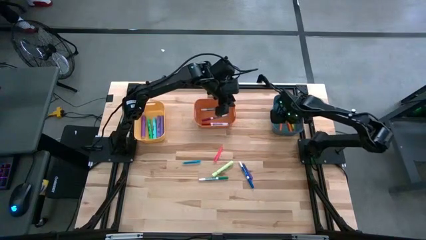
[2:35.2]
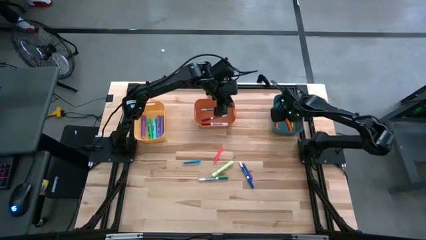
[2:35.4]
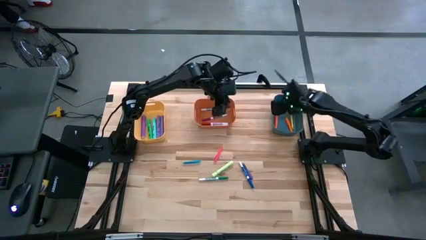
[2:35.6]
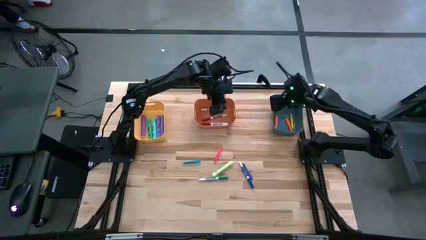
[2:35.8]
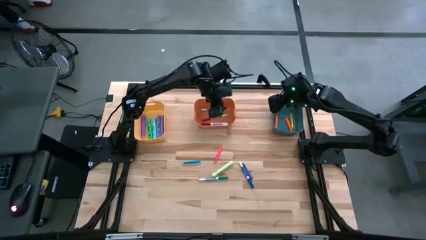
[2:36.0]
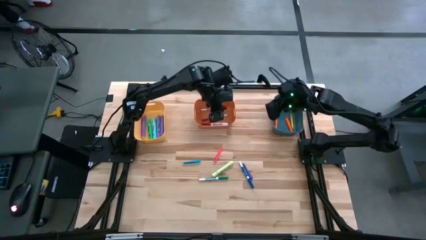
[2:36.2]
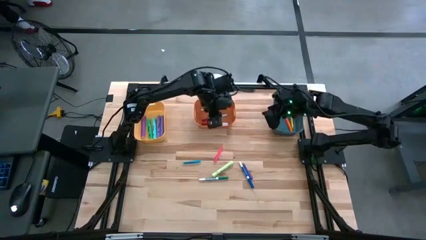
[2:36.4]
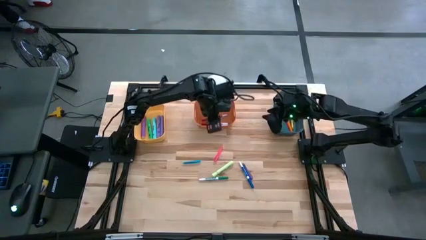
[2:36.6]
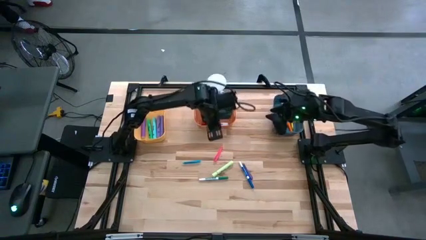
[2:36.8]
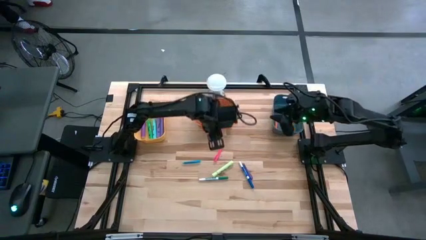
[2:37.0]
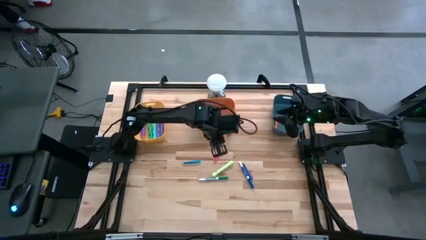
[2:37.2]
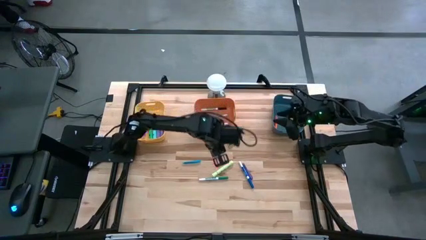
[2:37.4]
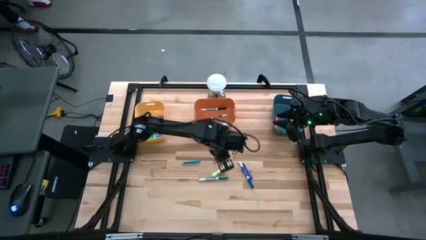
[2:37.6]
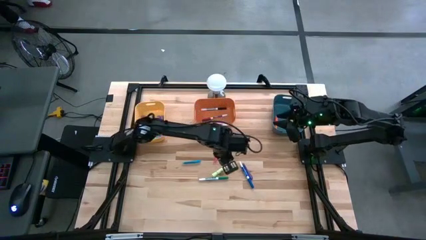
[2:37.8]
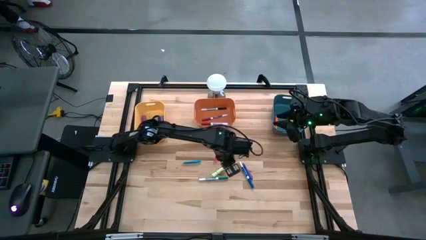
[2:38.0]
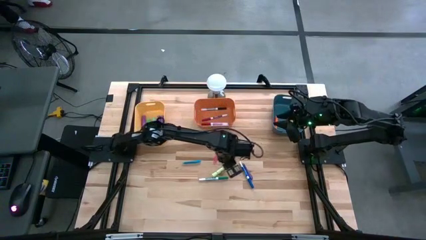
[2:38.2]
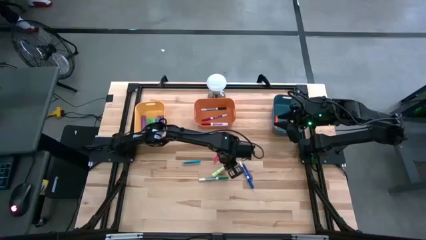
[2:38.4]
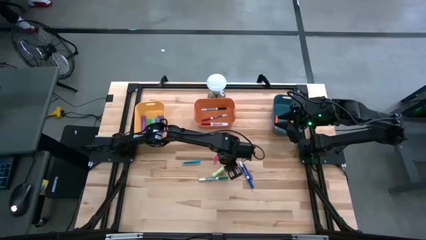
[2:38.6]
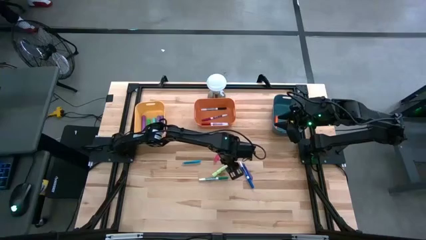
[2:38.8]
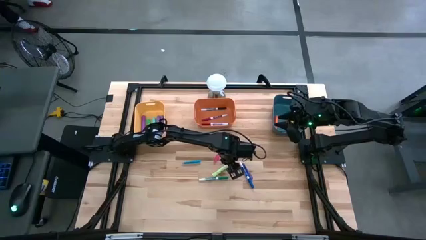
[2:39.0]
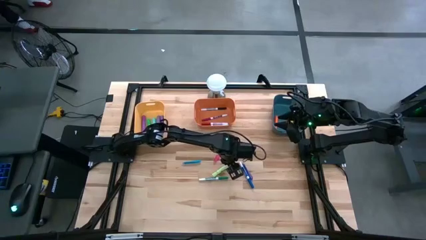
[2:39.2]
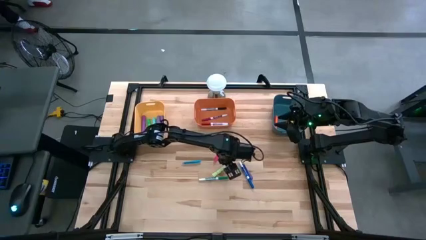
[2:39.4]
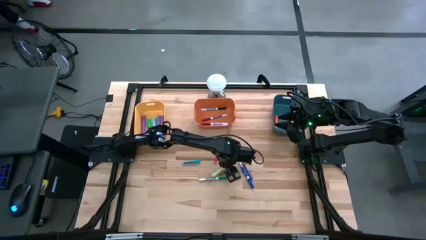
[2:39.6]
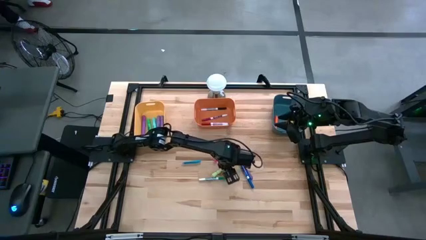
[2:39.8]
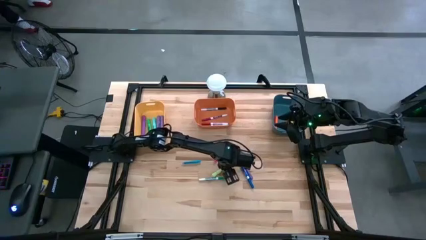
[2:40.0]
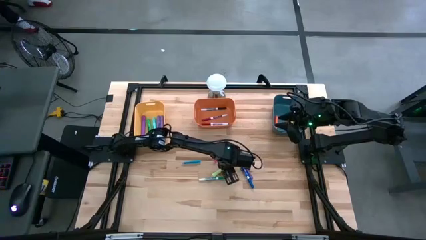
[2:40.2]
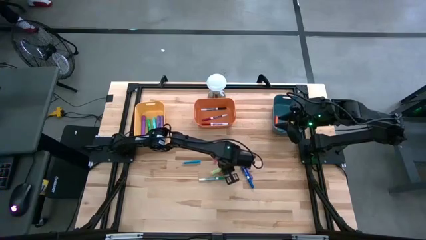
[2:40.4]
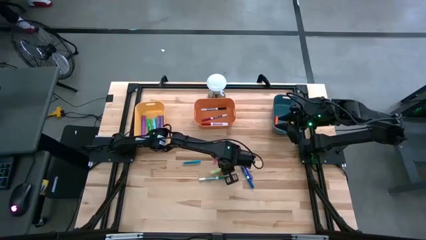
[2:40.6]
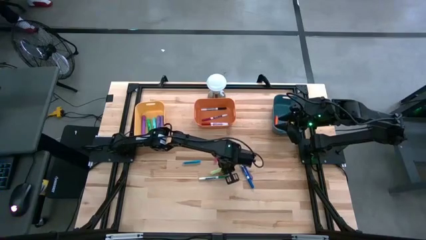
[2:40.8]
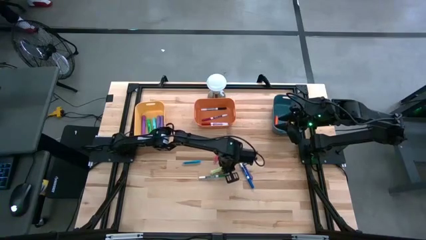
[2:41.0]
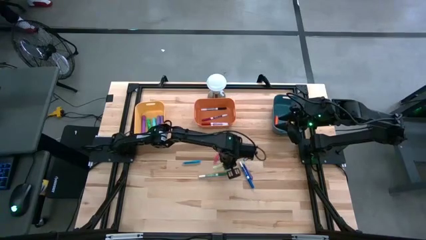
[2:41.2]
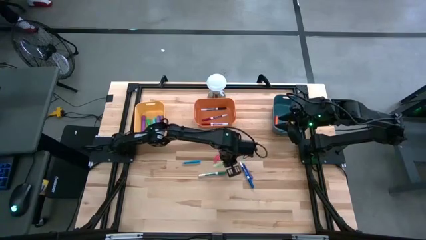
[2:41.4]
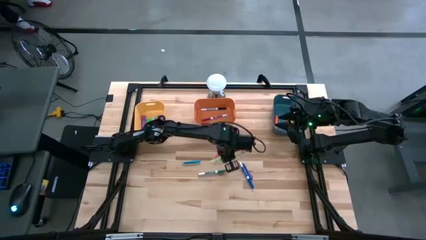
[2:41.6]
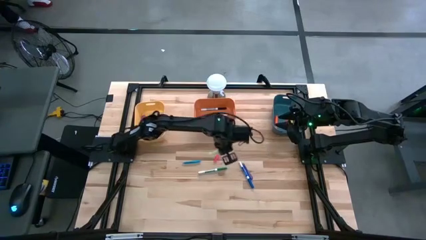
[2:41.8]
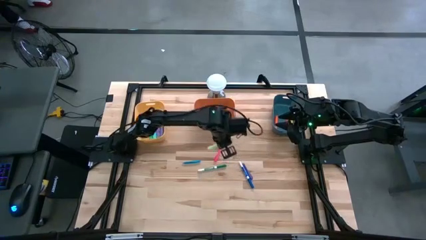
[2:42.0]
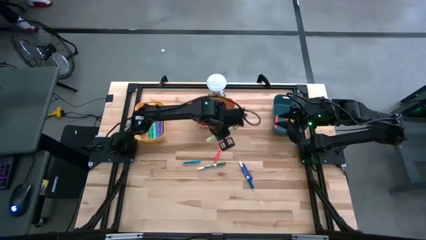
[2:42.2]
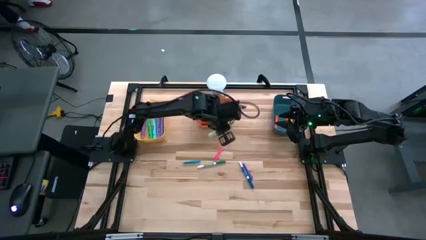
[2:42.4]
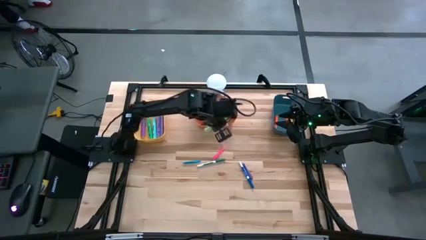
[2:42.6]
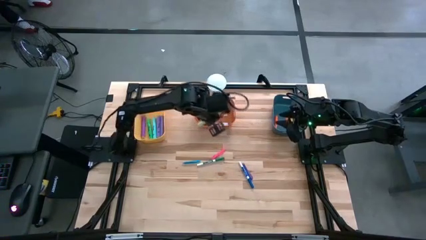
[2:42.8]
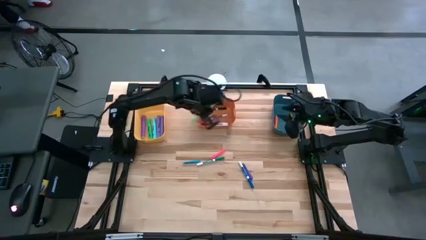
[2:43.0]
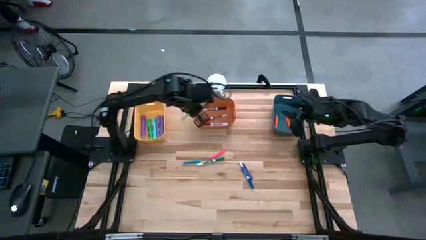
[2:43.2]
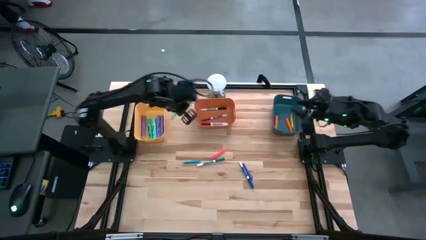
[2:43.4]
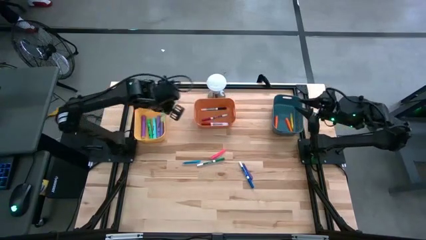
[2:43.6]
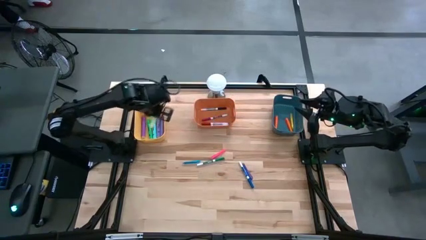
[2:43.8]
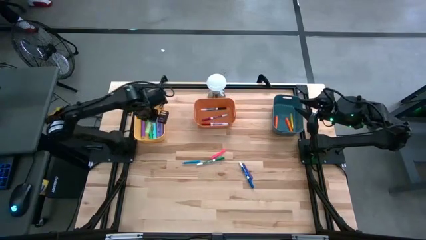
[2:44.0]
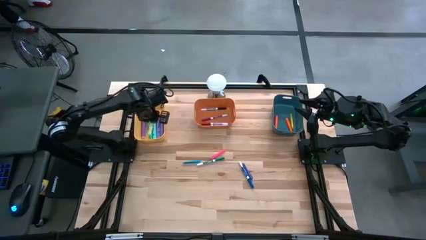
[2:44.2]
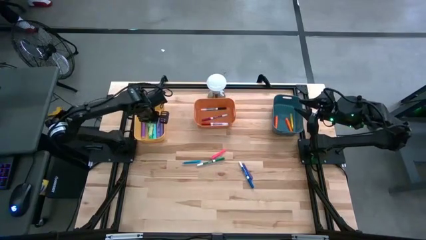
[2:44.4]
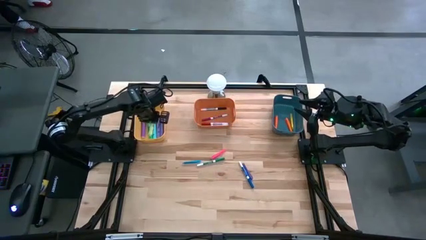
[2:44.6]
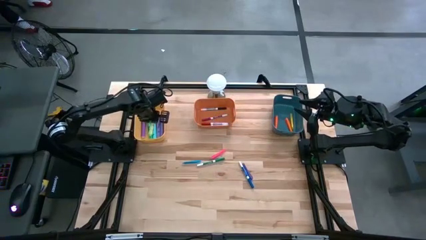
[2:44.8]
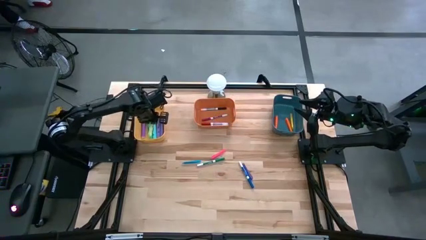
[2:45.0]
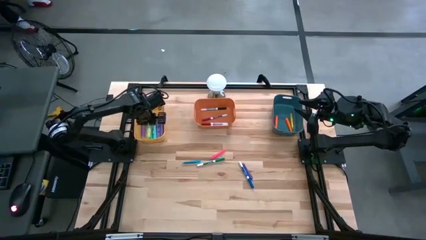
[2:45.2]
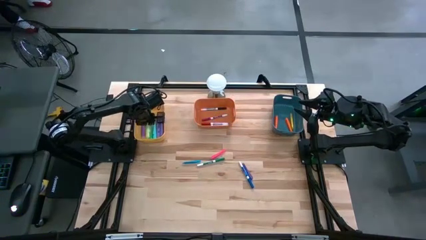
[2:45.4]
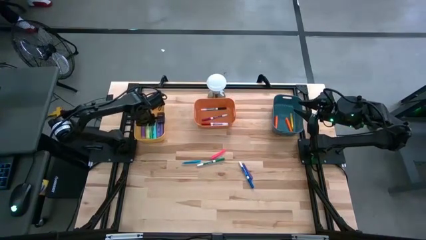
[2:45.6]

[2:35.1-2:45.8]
Task: Pick & Place Markers
Put the light green highlighter pen into the yellow bin

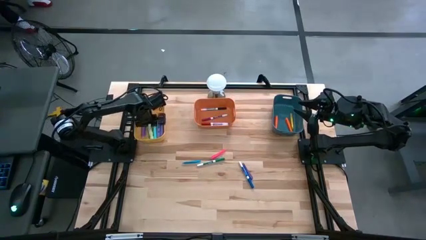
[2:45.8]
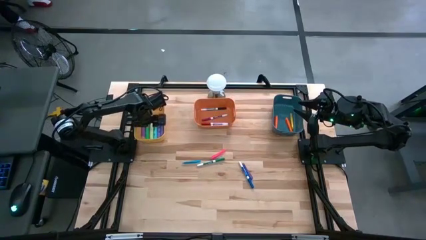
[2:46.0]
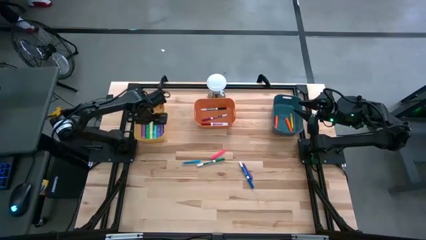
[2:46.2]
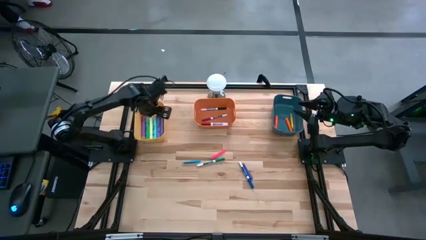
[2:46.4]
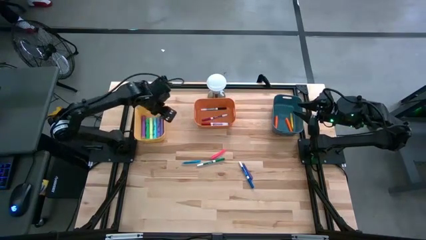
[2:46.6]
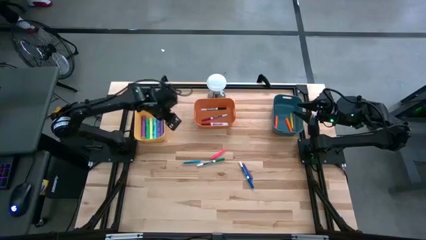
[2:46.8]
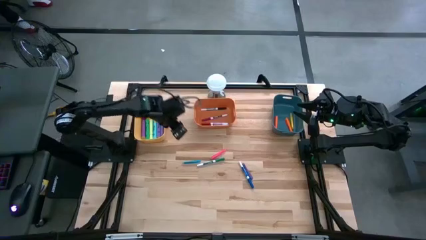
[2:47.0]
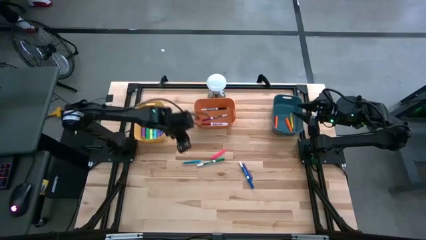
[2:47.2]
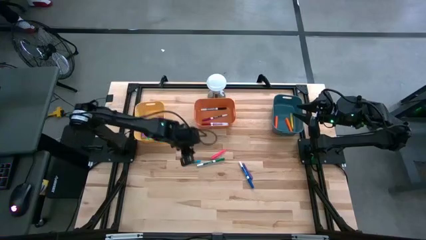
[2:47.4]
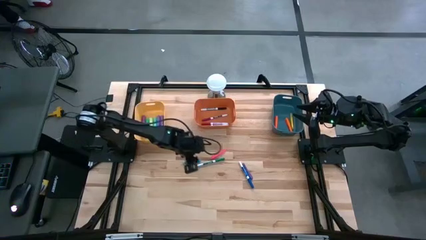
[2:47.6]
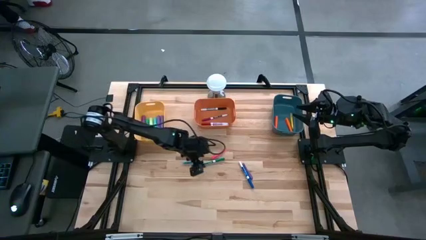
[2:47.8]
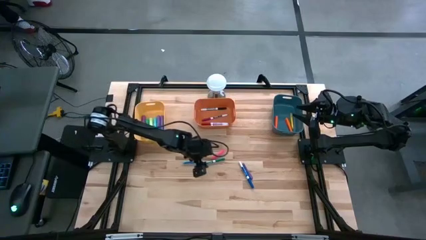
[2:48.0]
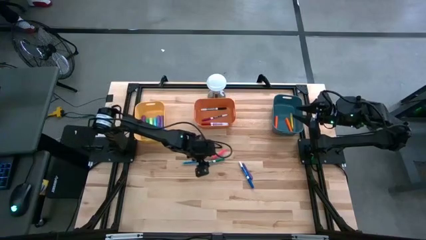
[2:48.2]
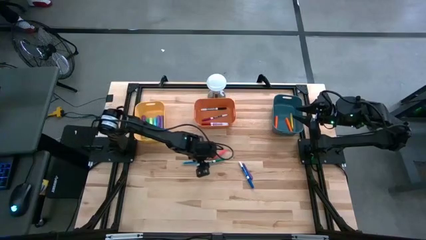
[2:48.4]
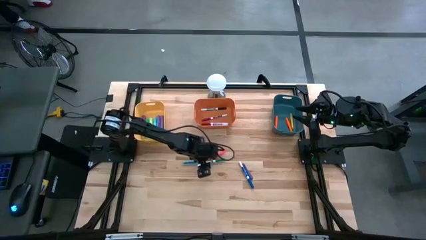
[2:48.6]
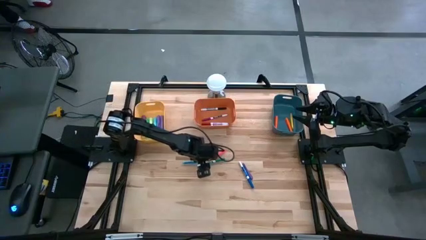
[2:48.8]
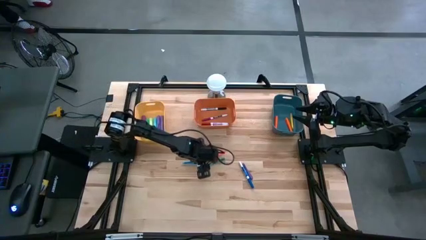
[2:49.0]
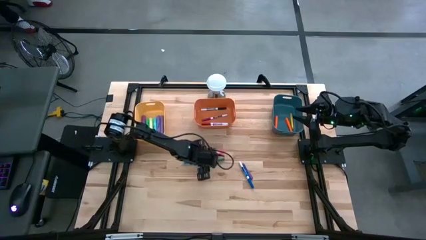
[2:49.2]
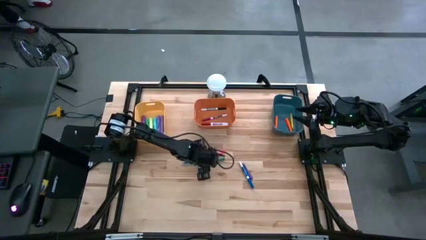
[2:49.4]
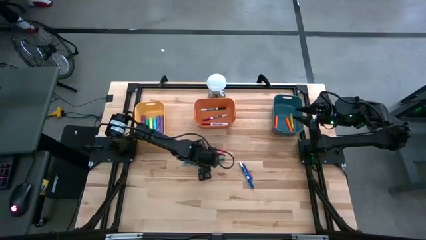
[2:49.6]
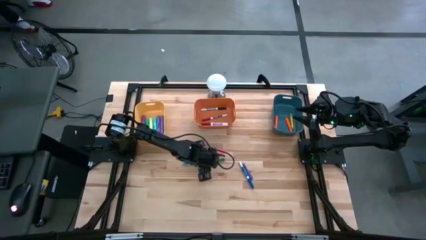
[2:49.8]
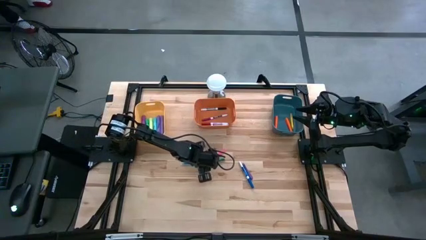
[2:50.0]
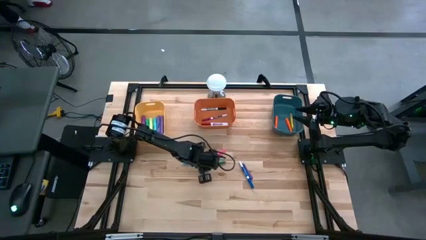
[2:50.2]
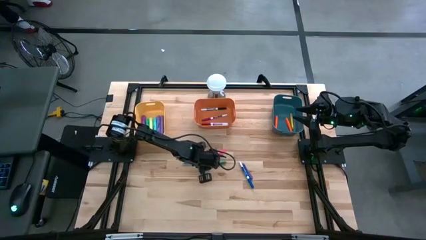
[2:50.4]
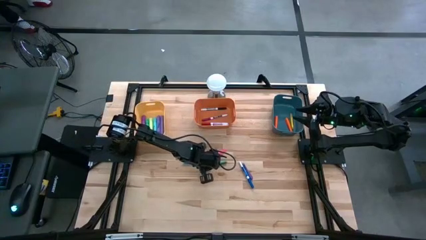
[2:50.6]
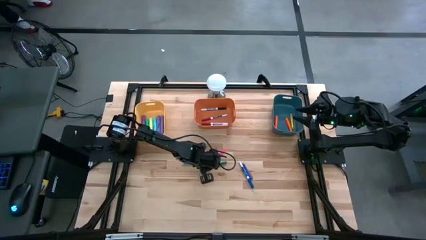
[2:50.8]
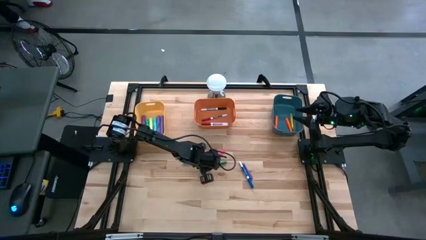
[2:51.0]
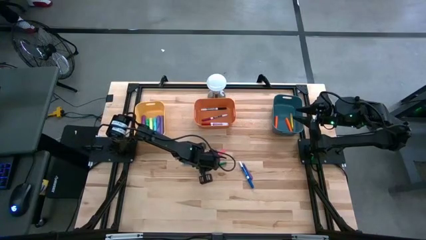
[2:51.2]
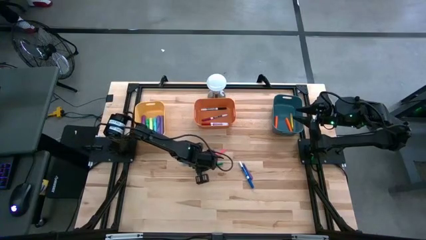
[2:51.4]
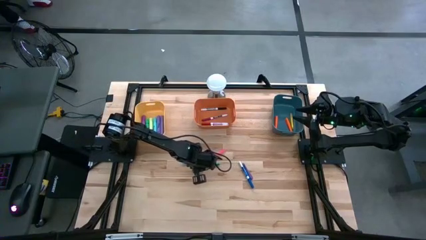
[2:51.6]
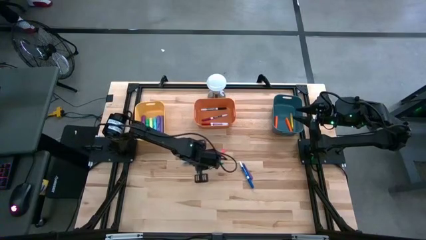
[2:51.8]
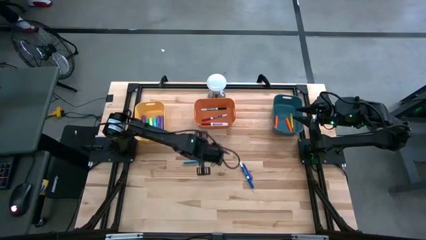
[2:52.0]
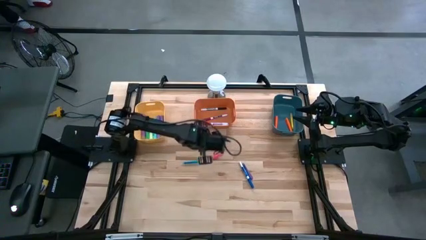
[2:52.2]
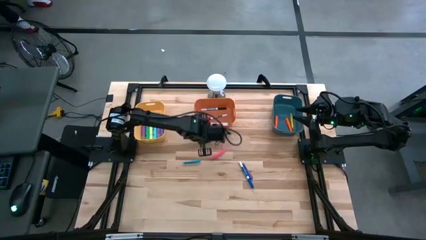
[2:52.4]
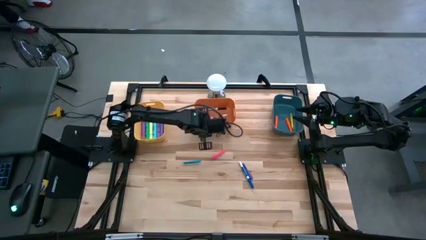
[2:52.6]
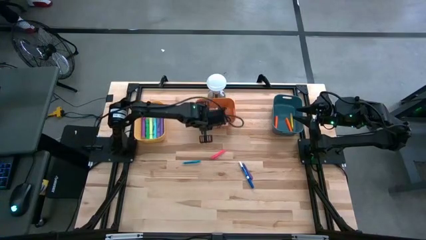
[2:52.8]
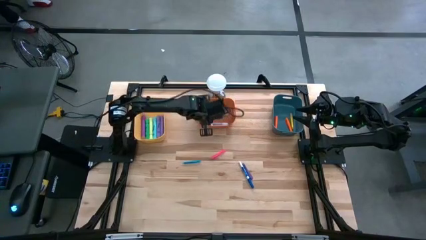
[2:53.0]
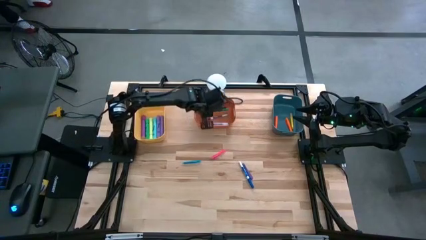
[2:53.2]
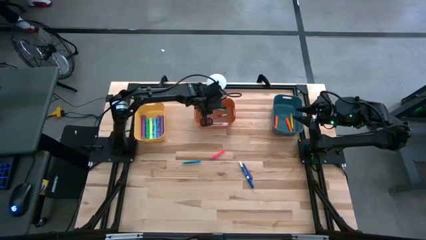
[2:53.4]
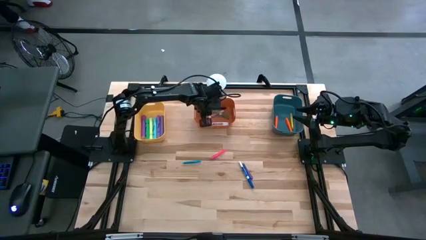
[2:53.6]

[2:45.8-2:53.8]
Put the green marker pen into the orange bin
